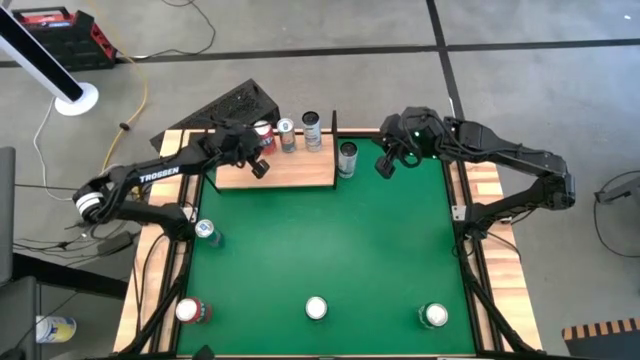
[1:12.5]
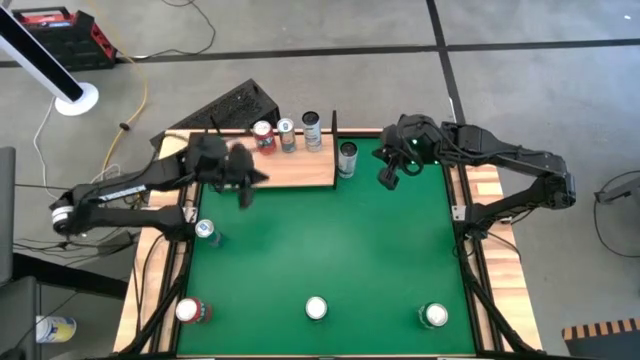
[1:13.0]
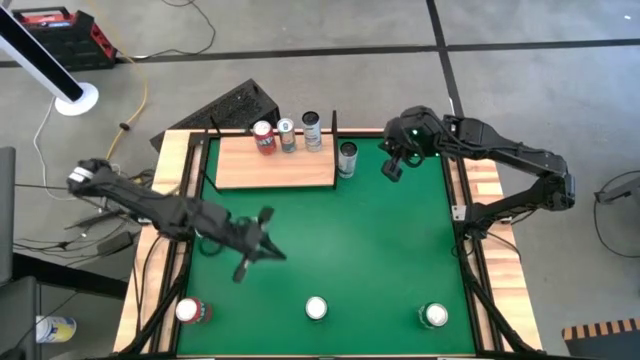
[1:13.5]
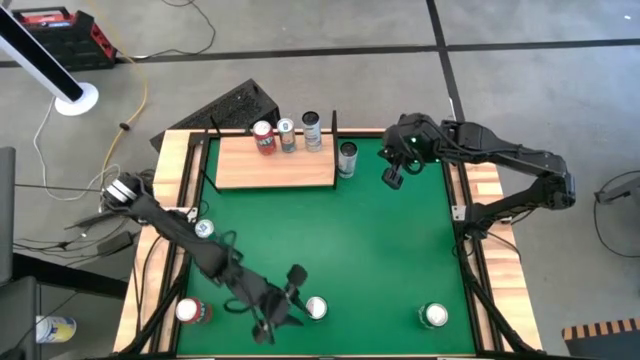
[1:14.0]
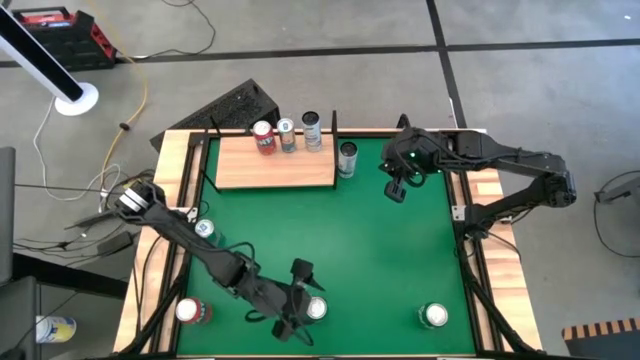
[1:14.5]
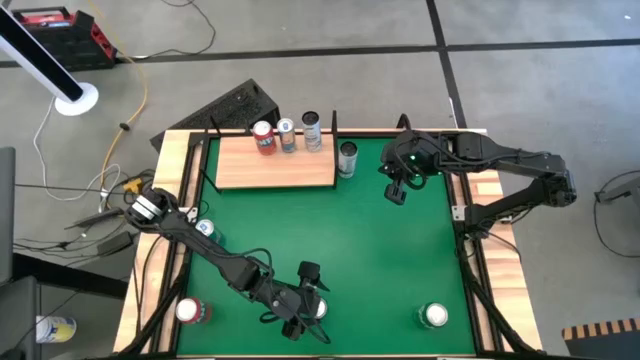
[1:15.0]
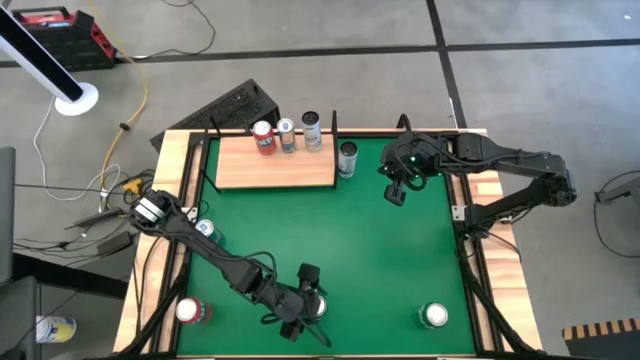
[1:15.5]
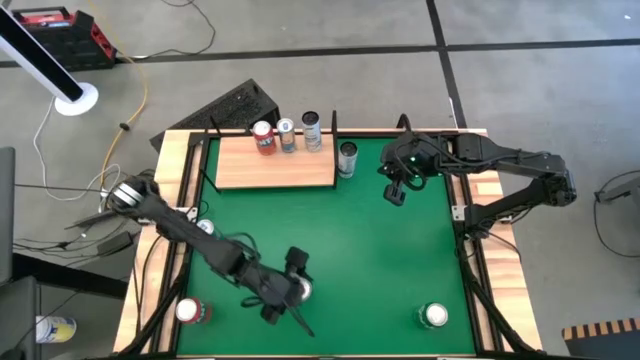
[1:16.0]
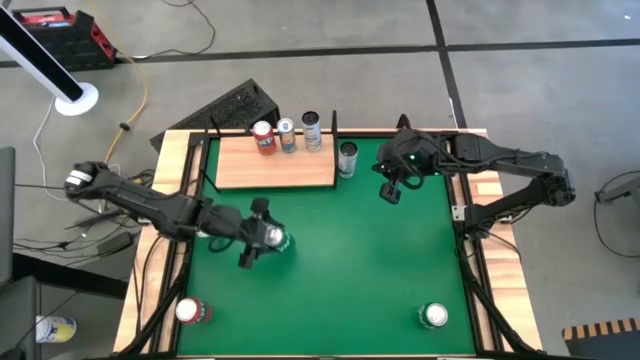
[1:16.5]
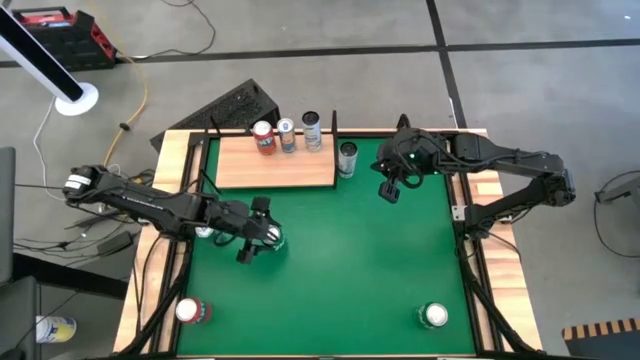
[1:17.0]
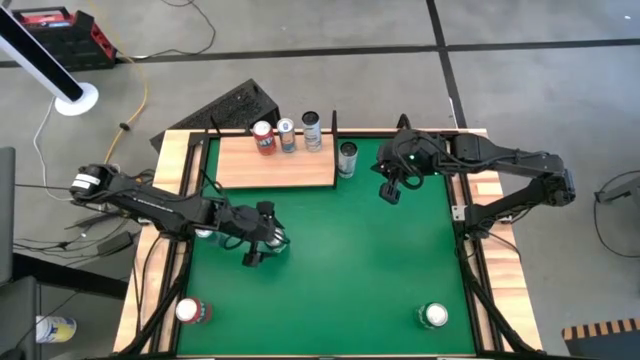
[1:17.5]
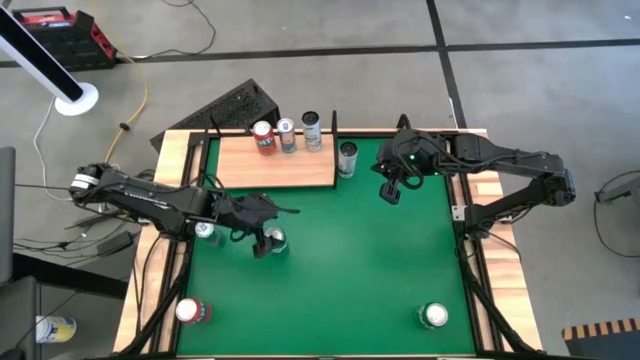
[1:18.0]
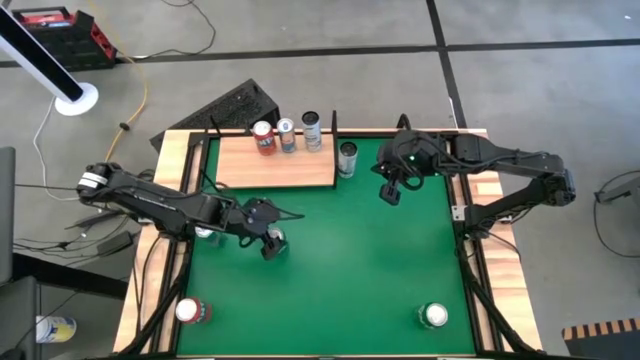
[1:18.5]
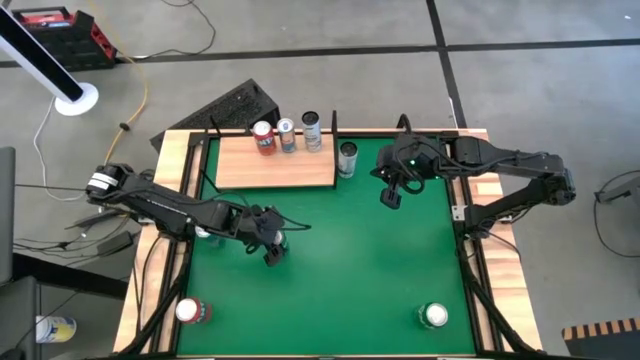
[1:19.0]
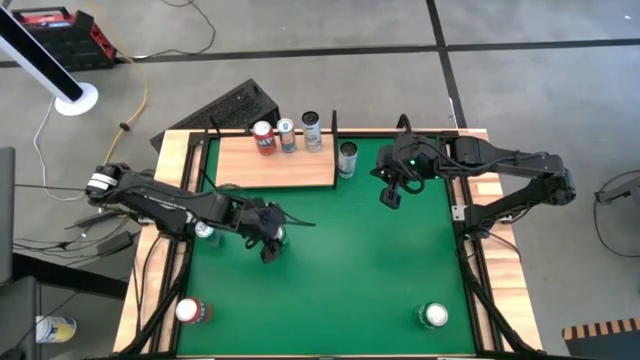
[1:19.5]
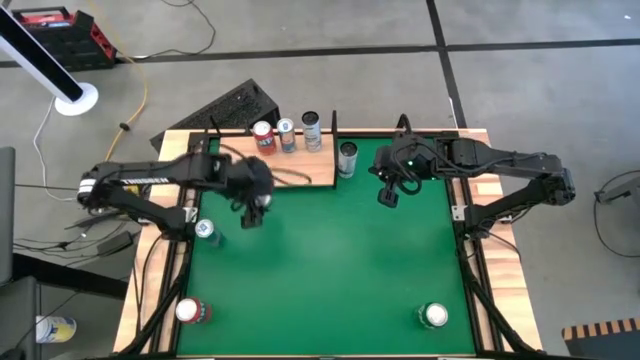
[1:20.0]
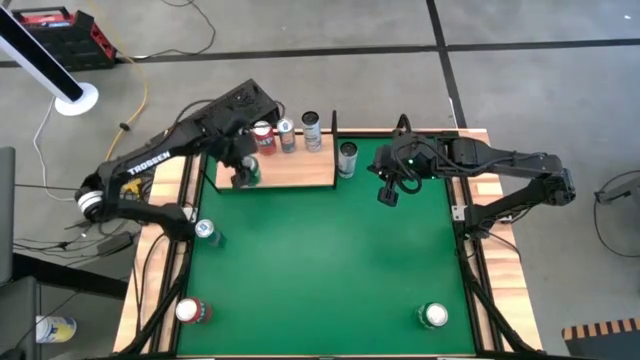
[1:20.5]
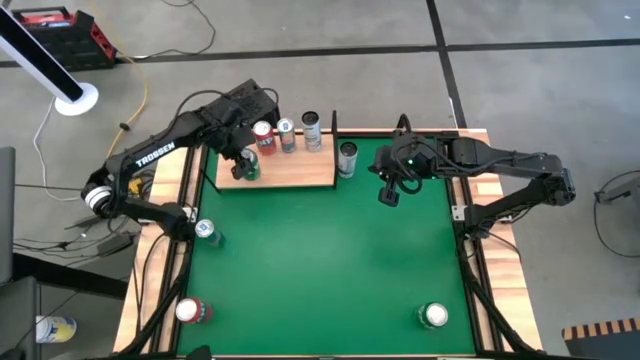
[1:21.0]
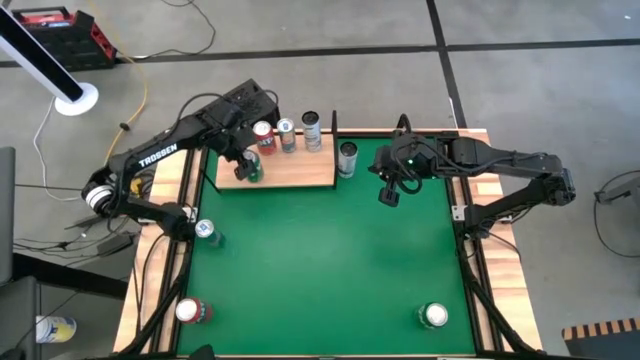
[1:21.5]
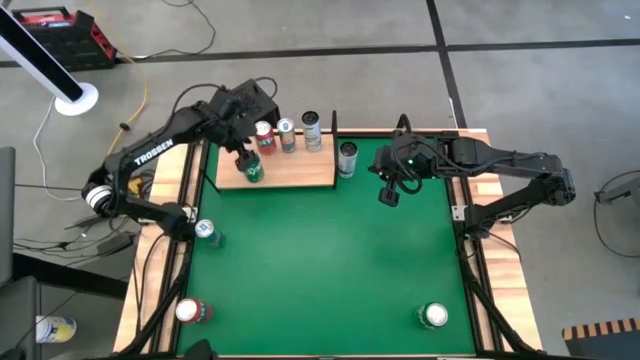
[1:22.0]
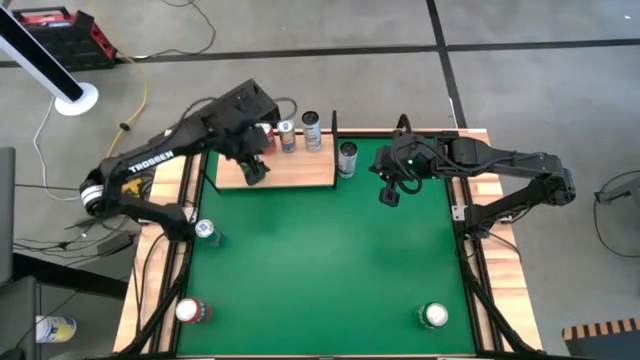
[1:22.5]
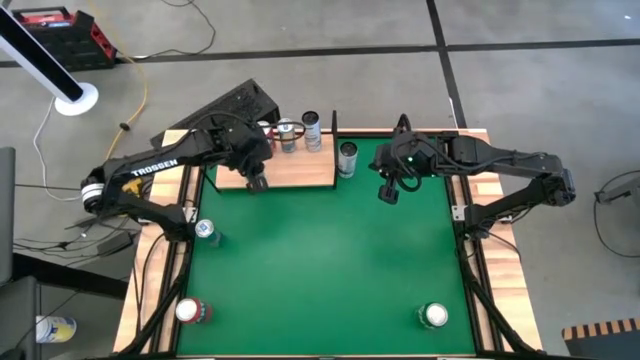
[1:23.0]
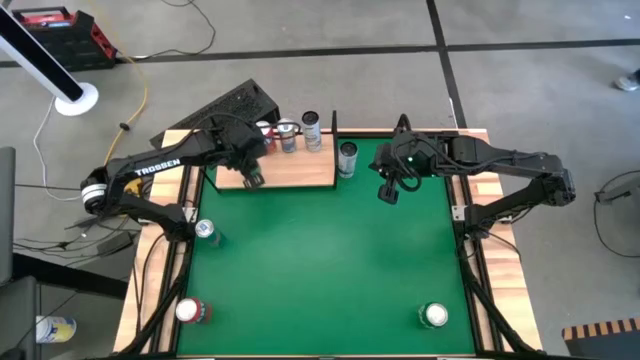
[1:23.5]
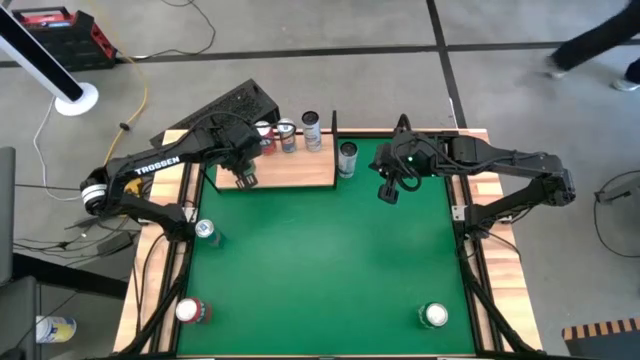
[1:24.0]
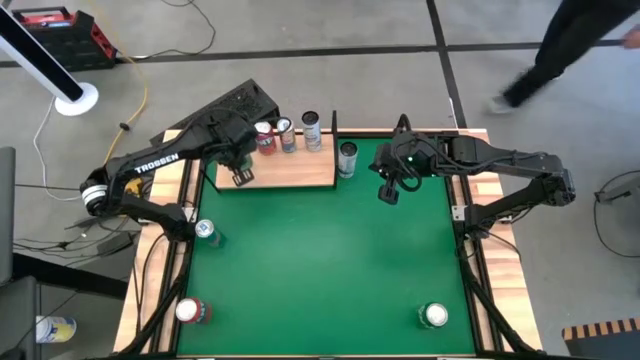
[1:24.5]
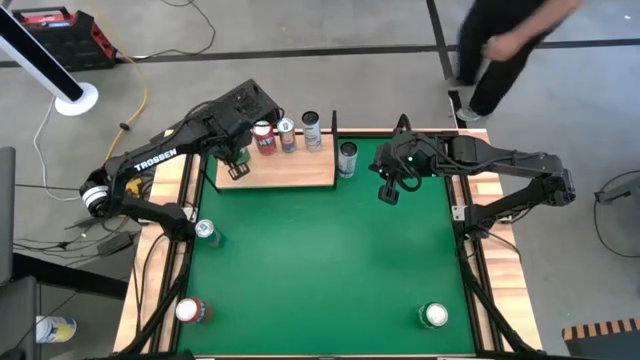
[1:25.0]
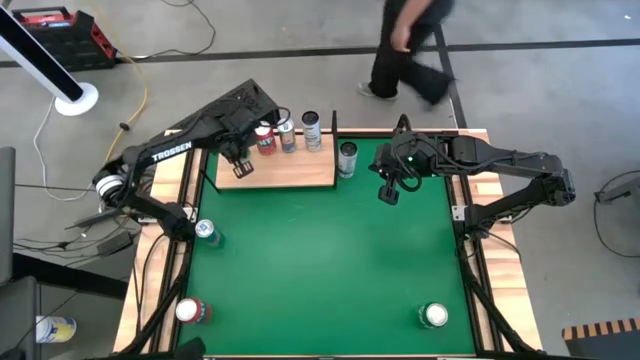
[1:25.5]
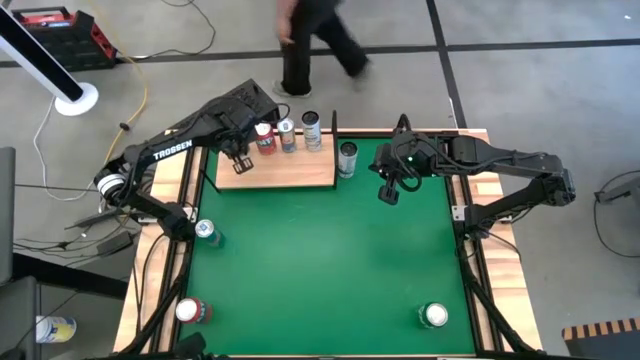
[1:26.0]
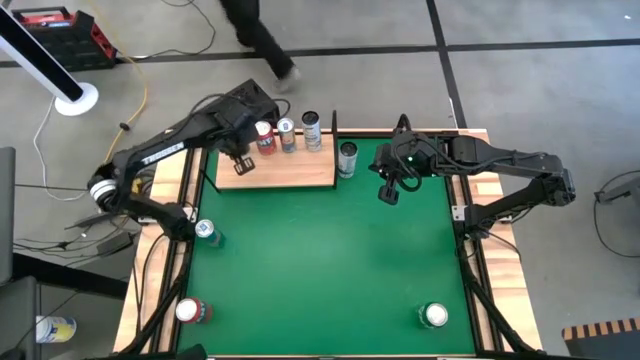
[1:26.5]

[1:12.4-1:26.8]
Task: Place canned beverage on shelf
Put the left green soda can on the shelf

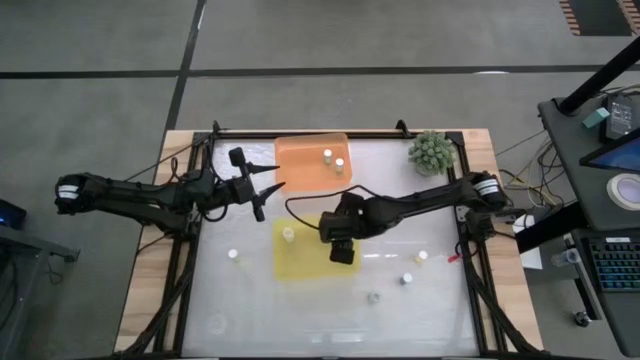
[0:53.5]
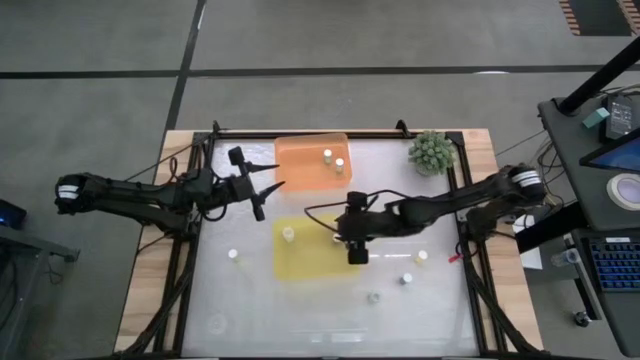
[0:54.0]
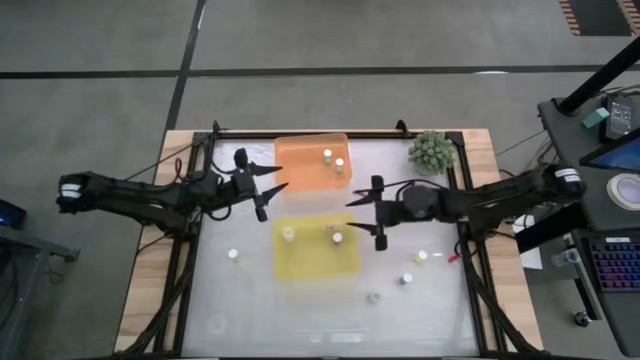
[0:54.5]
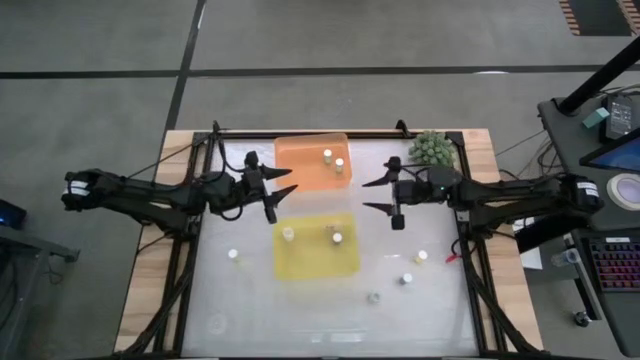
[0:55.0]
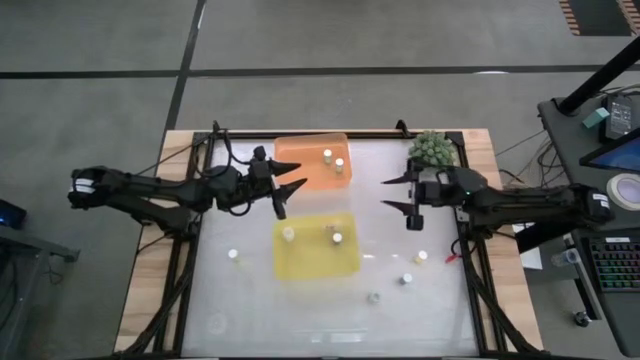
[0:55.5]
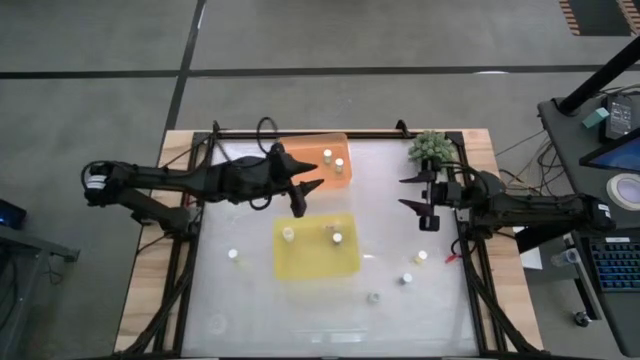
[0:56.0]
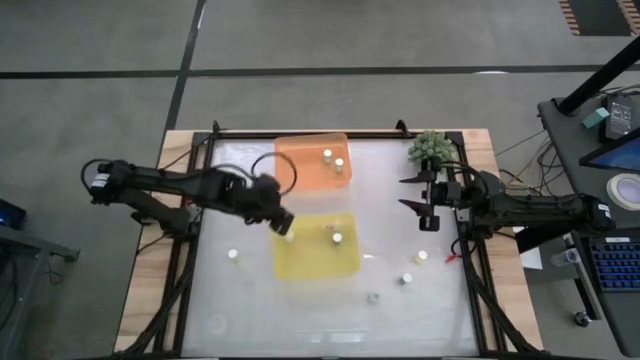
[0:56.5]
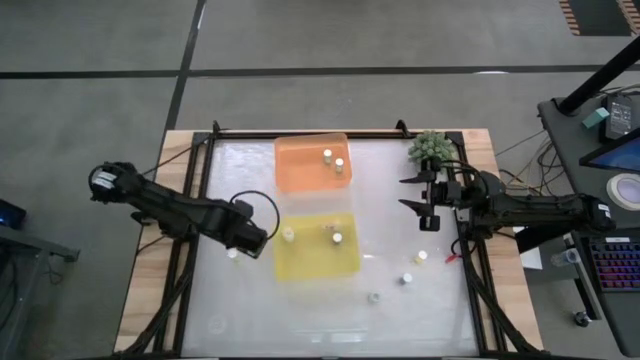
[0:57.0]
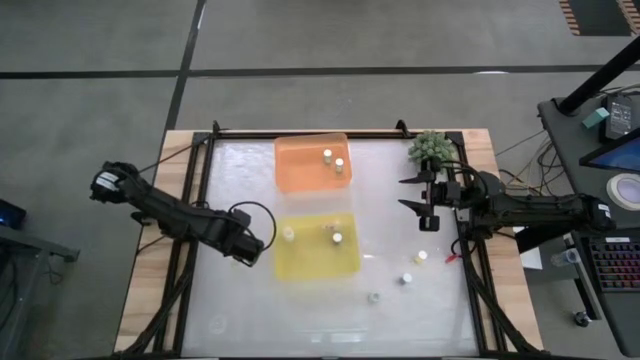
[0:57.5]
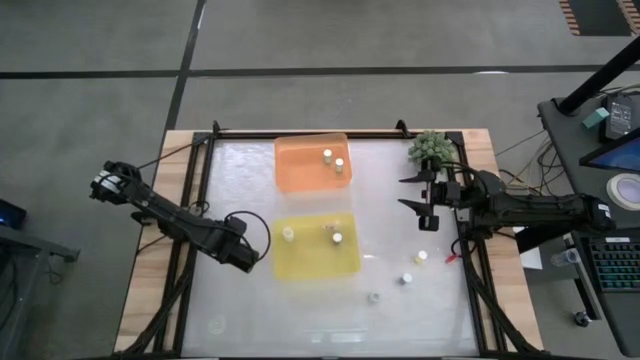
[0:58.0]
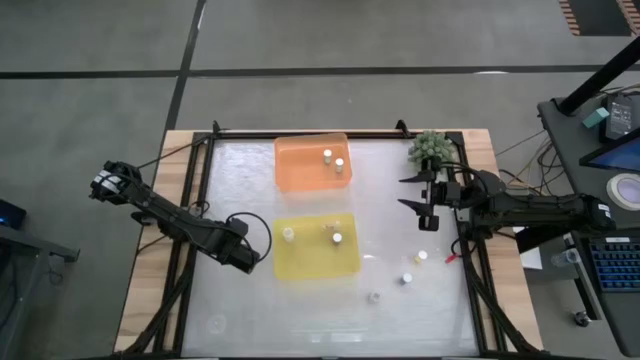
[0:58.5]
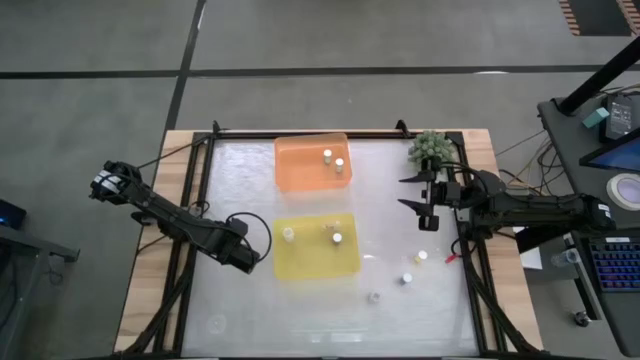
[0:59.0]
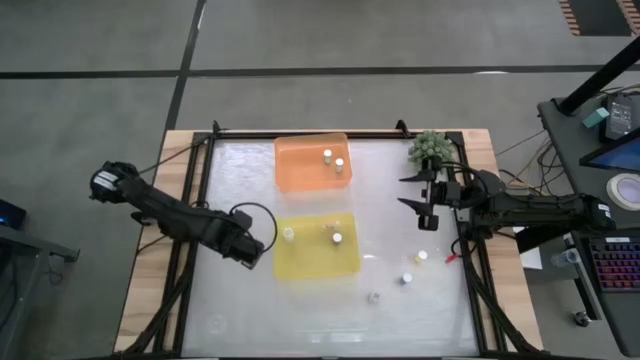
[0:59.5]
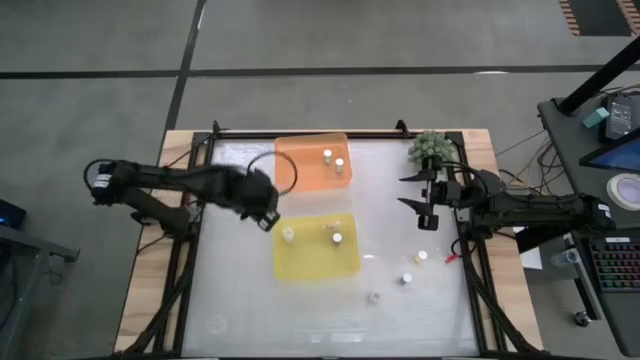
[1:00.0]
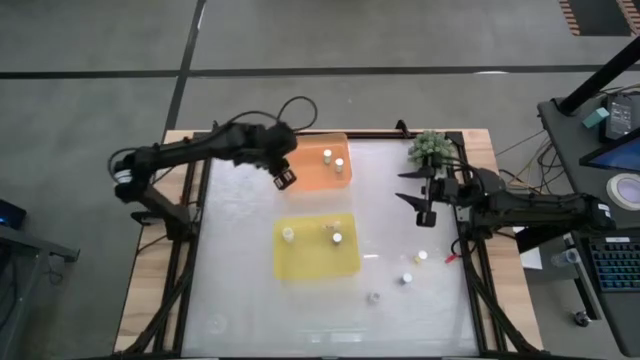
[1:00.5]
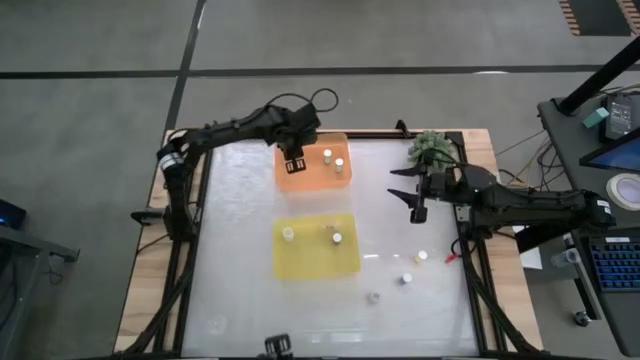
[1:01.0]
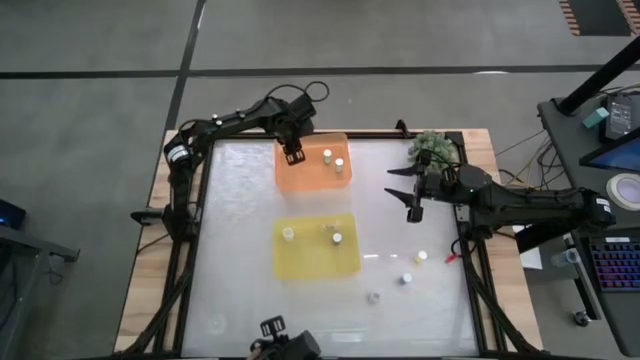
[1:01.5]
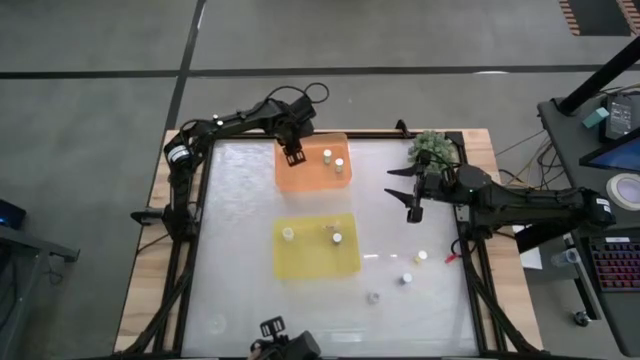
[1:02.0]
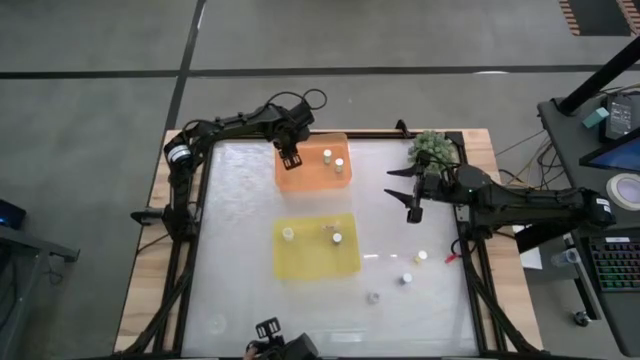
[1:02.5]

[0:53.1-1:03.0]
Task: Pick and place medicine bottles into bin by pill shape (circle, oval)
Put the left yellow tablet bottle into the orange bin
